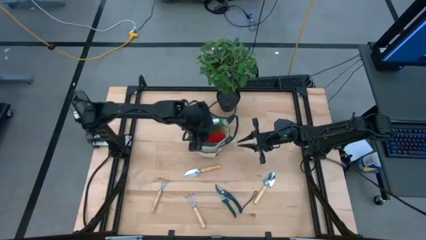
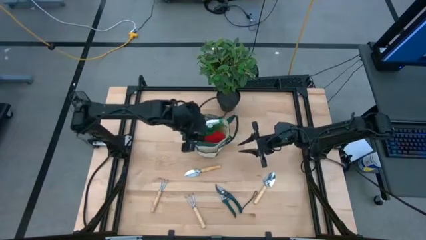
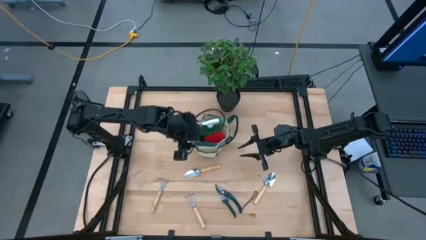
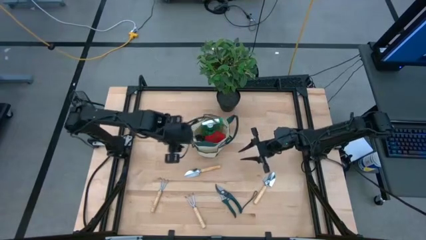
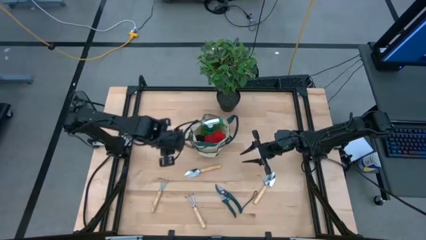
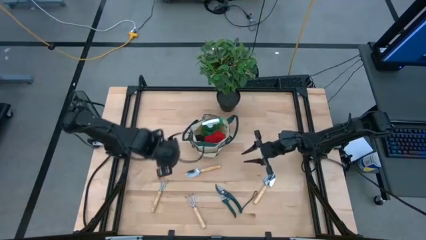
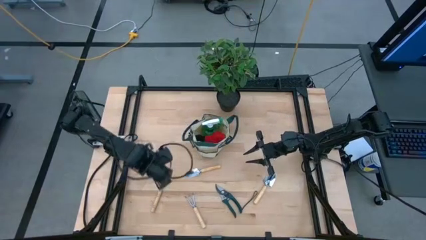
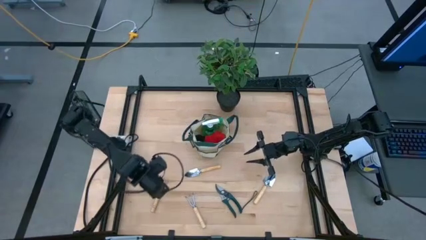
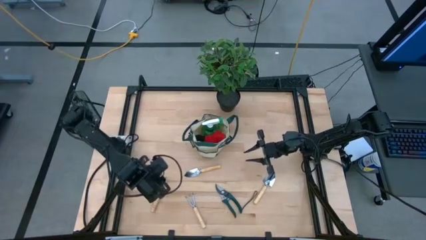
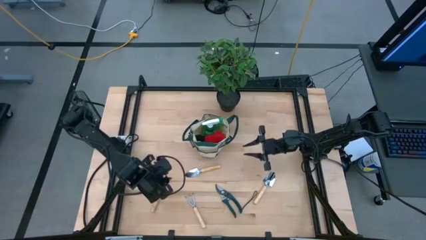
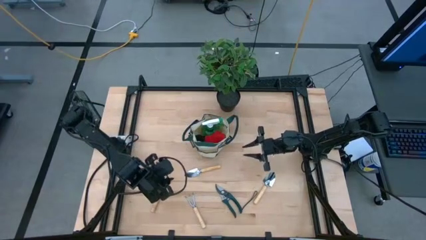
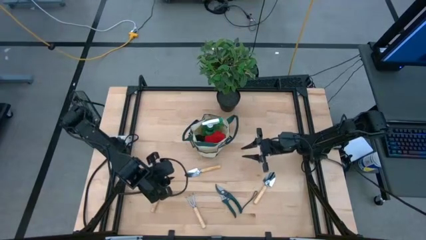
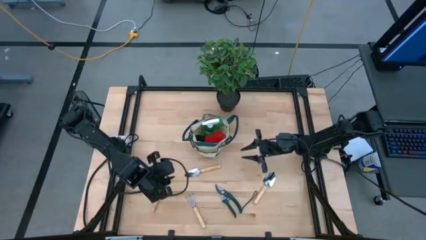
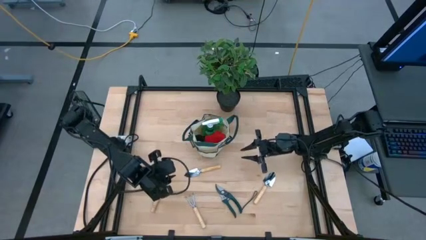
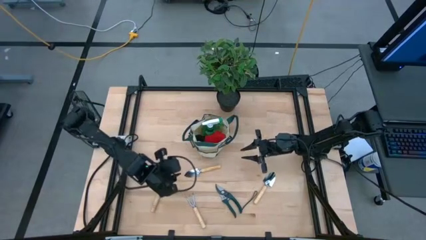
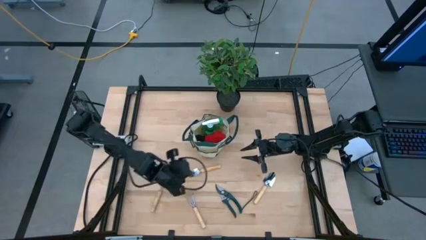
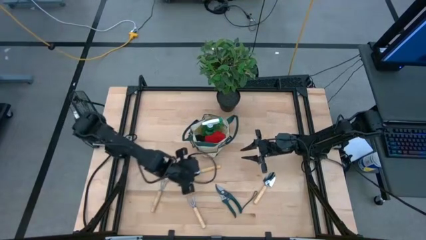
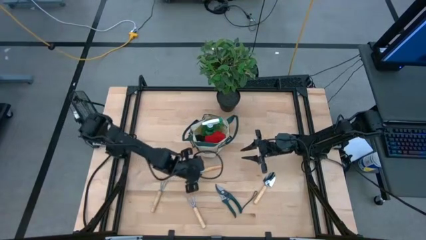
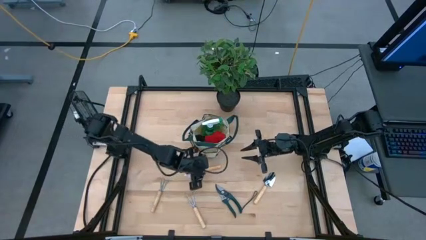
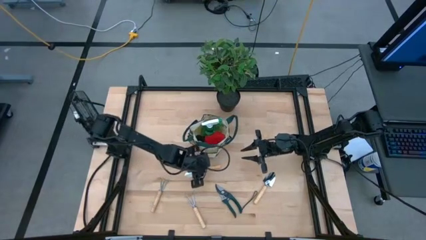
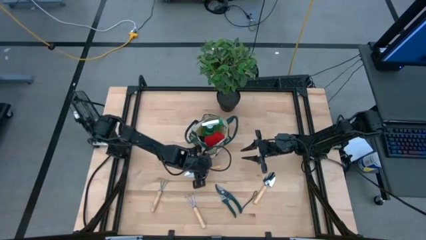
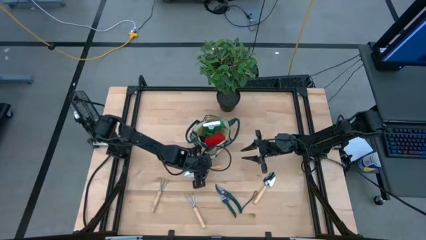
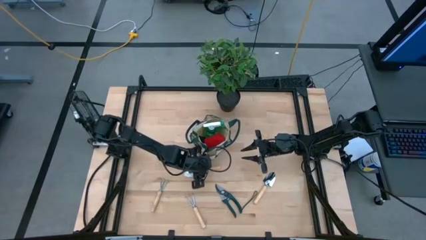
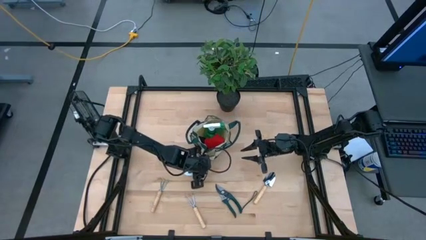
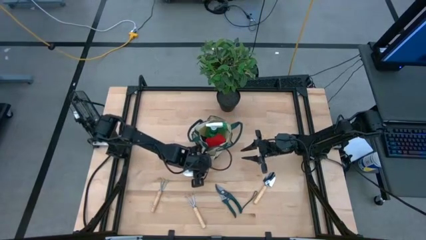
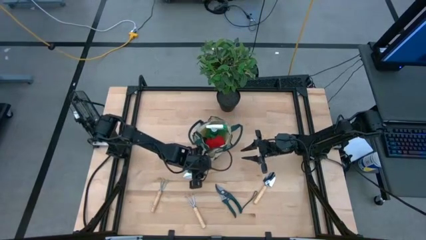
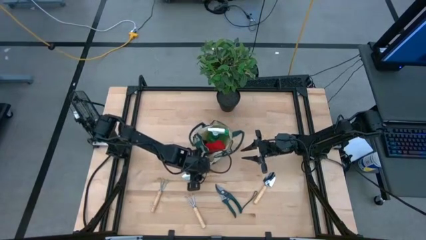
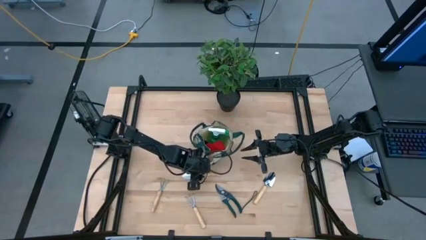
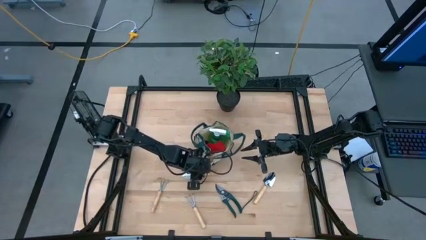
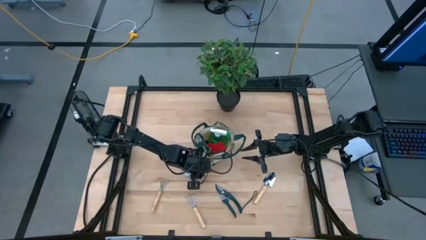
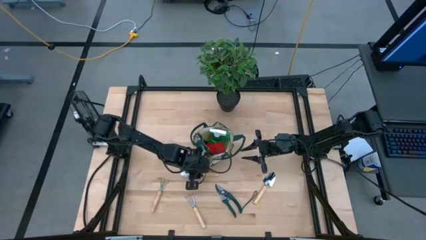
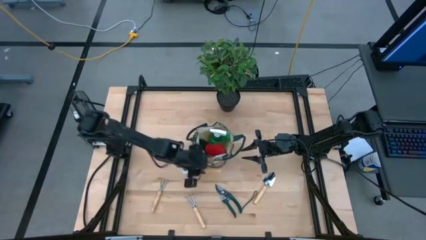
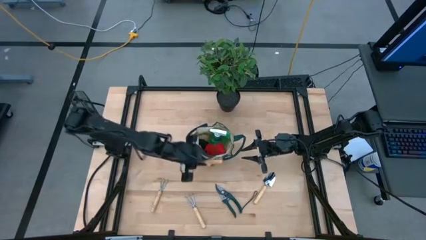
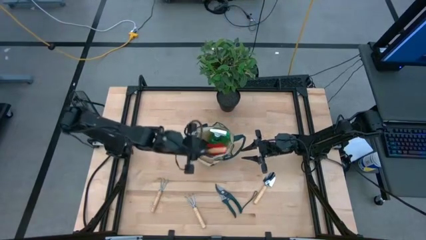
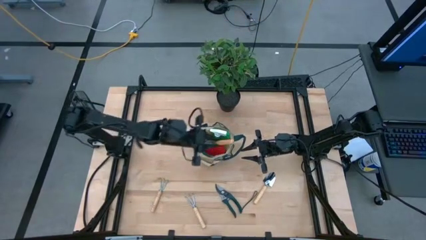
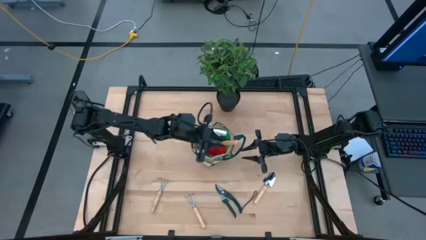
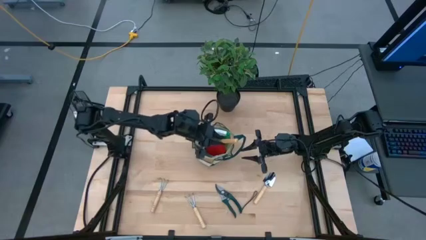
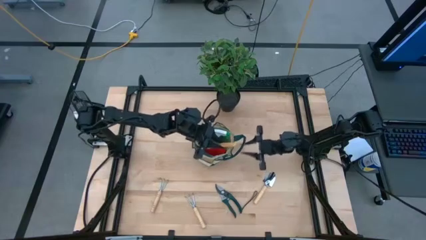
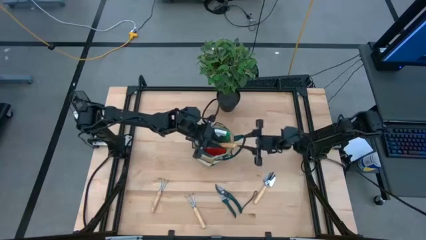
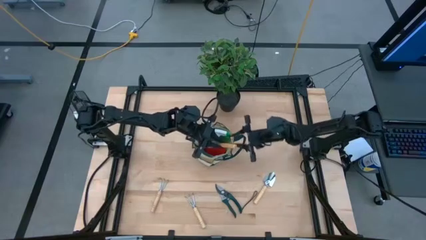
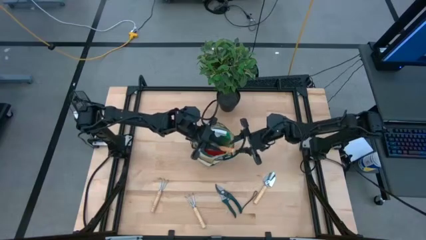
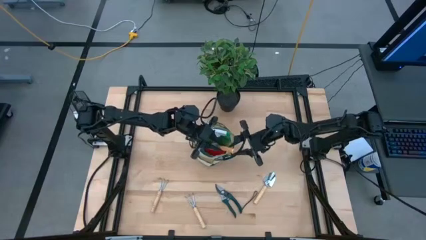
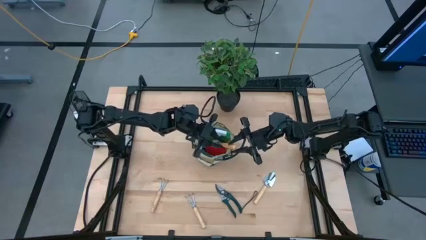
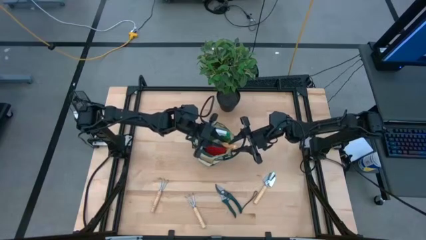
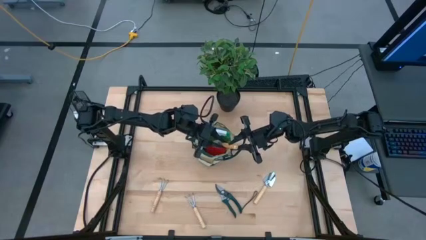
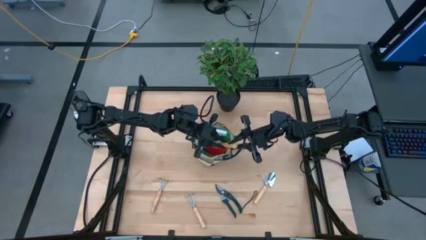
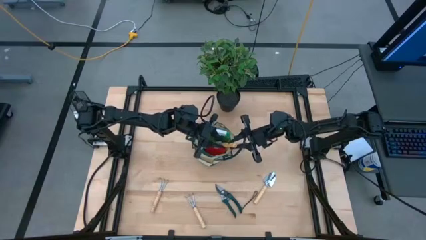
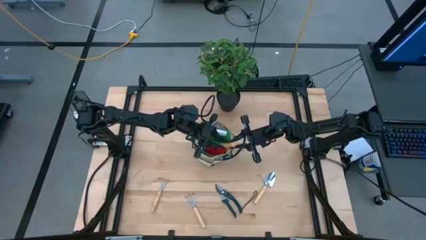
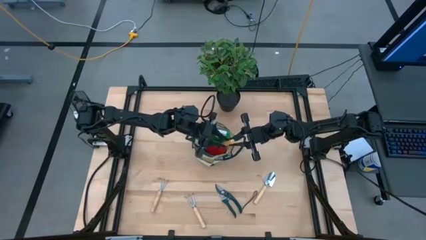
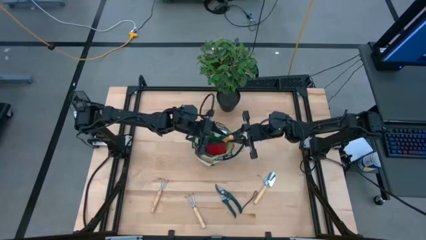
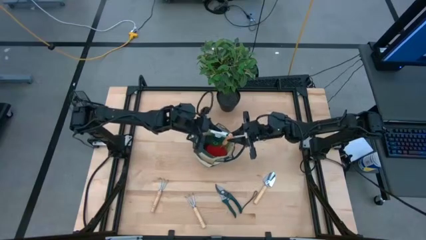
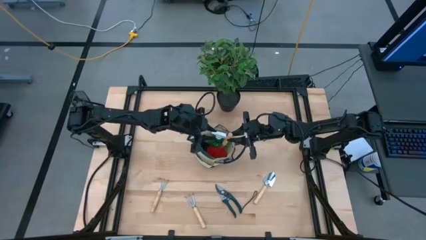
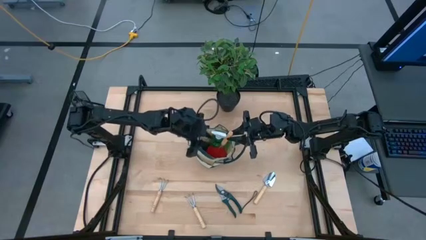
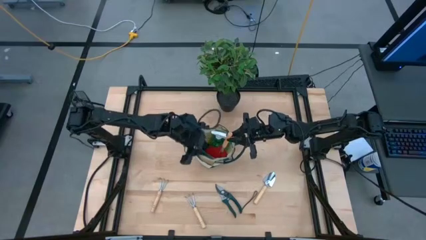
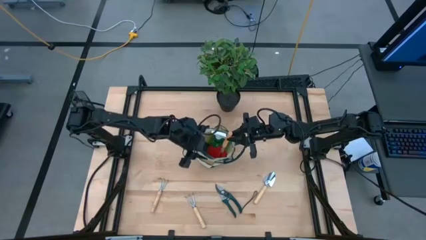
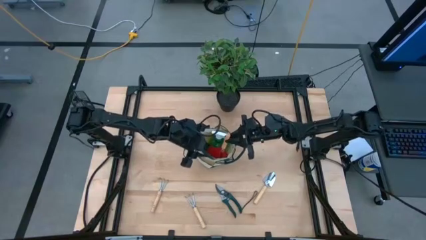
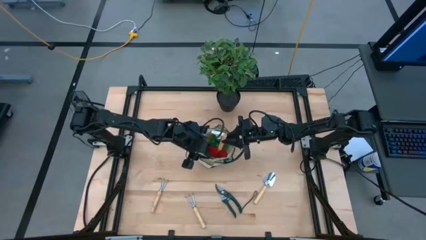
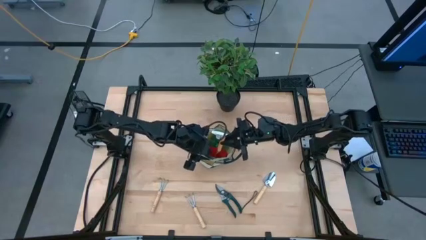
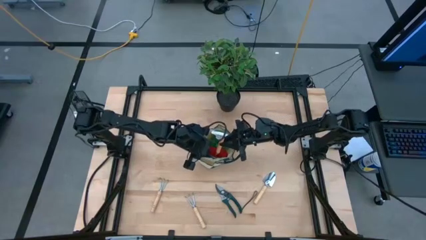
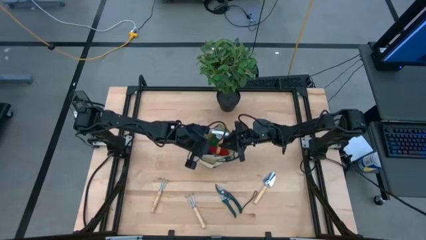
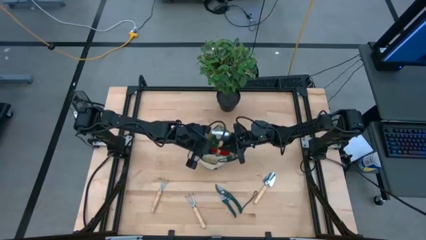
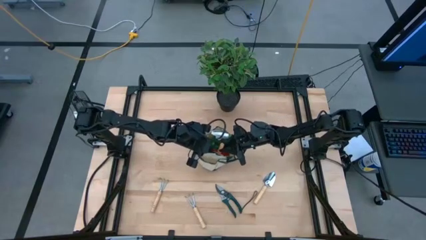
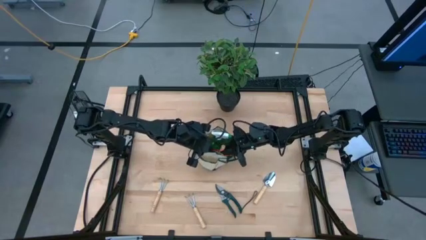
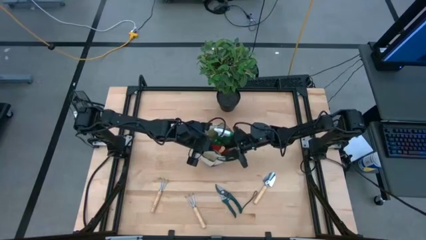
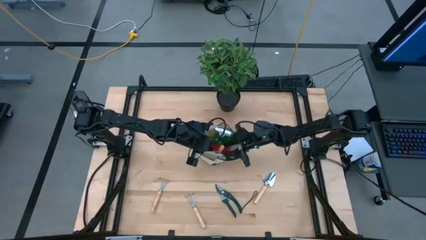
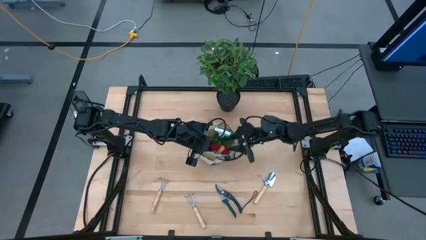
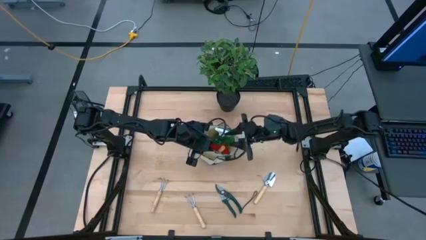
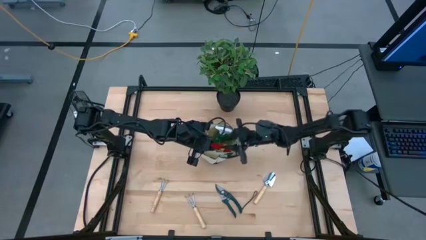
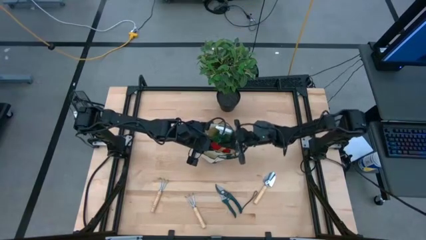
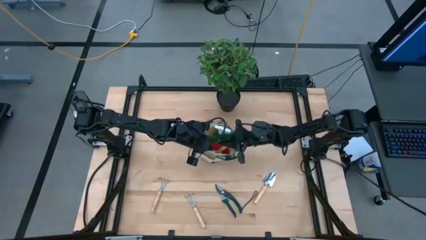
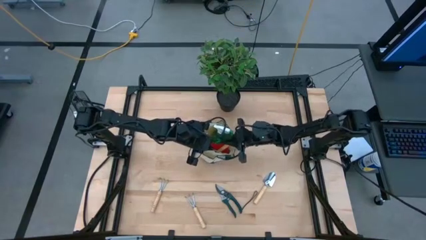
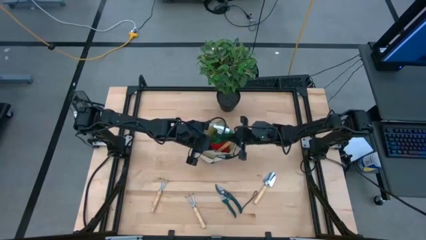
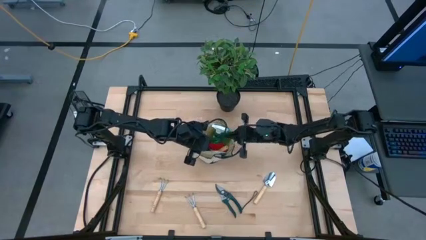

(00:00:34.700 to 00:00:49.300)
Task: Pick & Place Garden tools in Gardening bag
Put the top hand trowel in the gardening bag

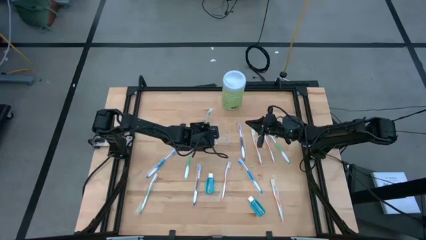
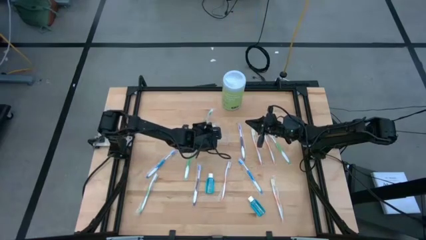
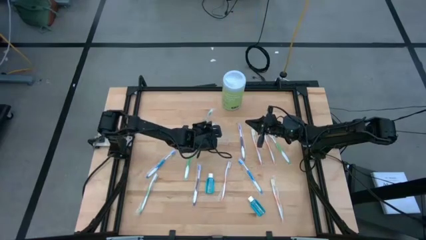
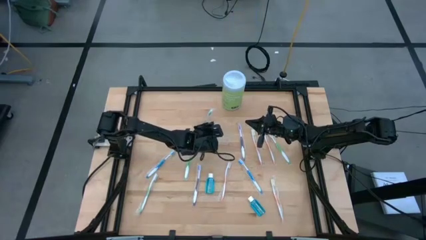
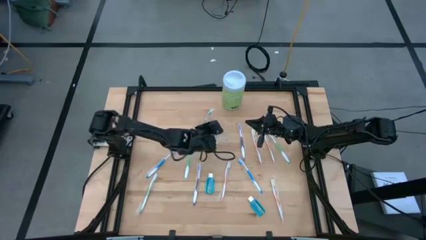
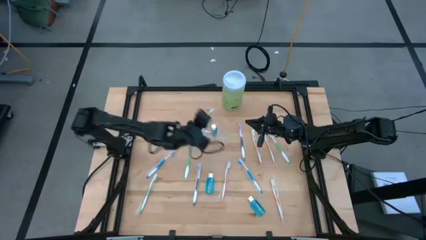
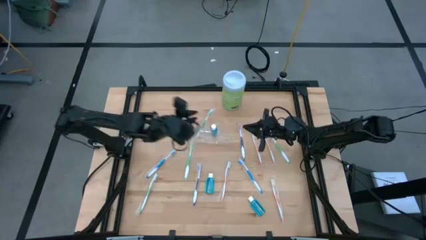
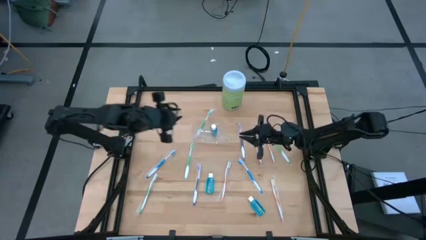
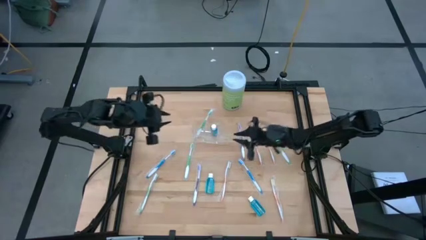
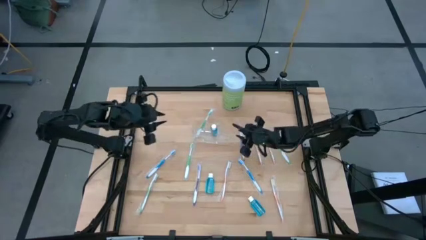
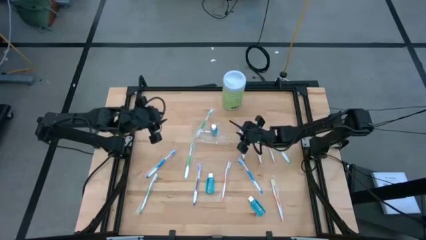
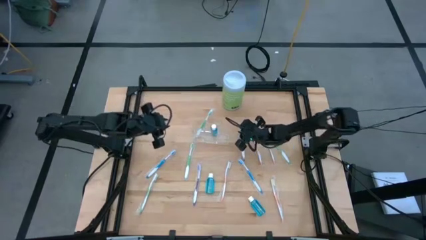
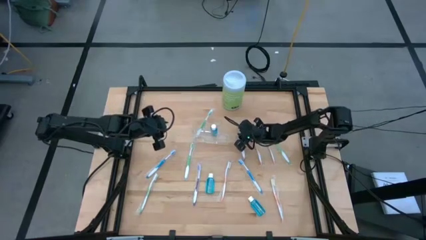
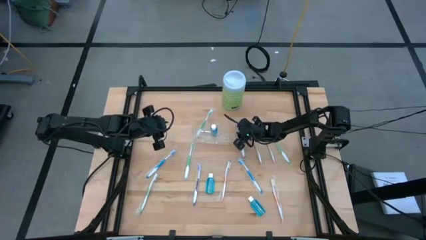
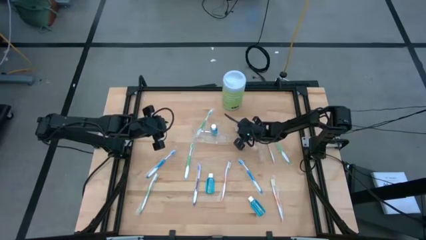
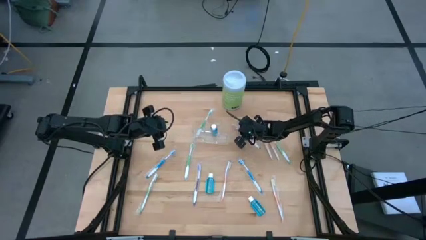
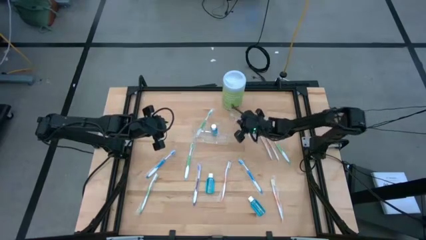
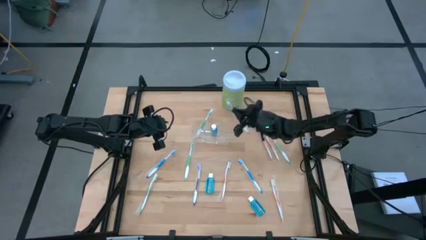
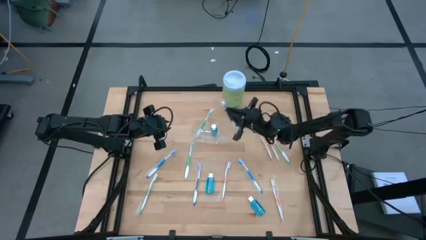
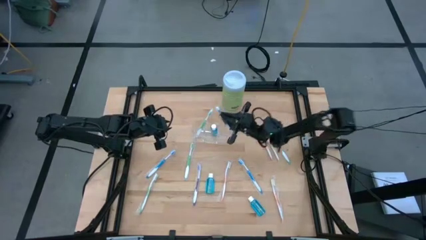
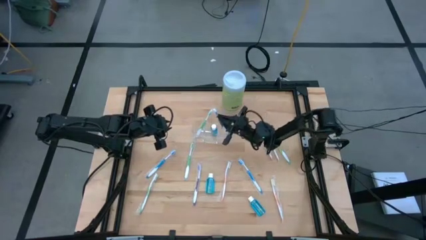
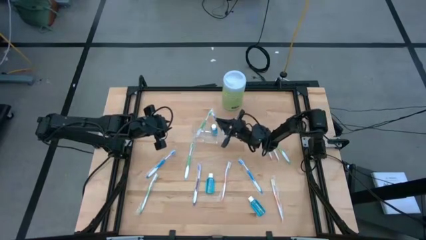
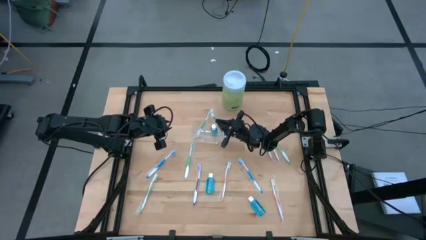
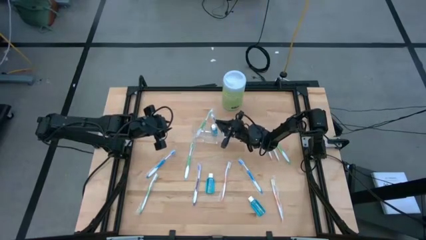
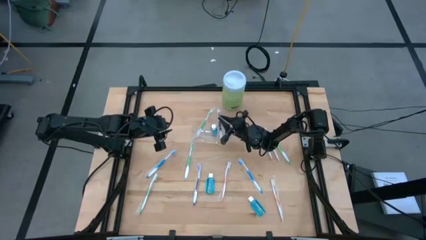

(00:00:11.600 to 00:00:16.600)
Task: Pick & Place toothbrushing station
Put the purple toothbrush into the transparent organizer
